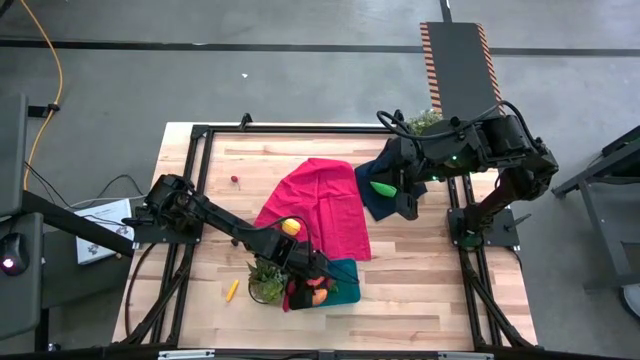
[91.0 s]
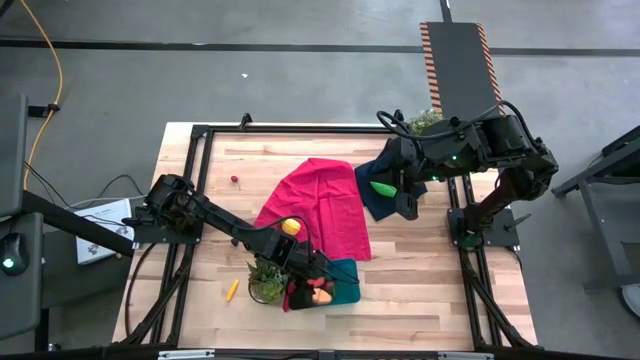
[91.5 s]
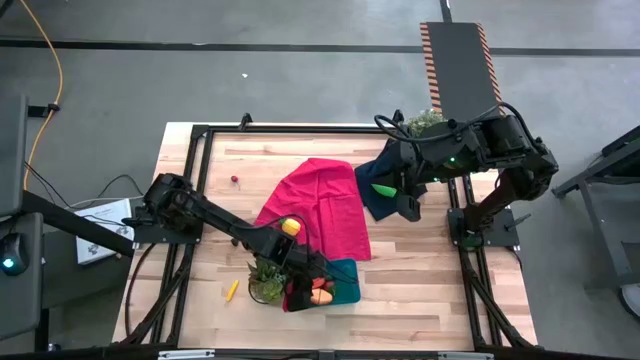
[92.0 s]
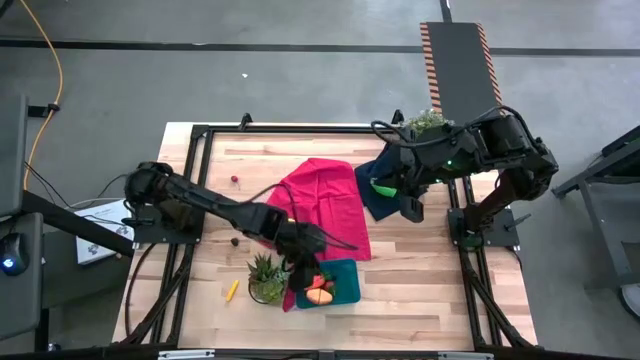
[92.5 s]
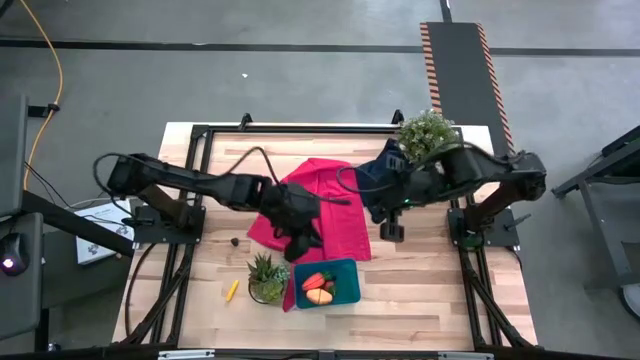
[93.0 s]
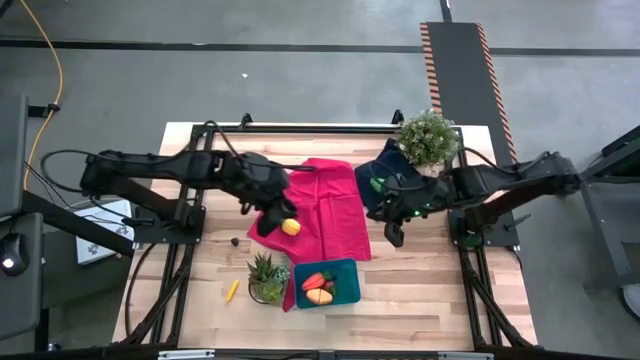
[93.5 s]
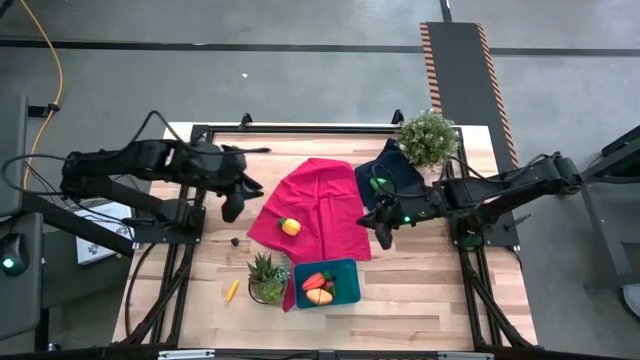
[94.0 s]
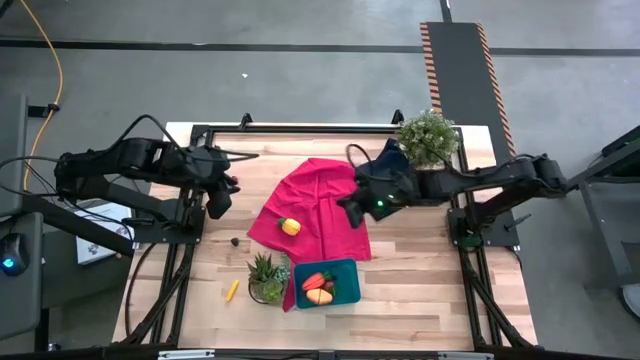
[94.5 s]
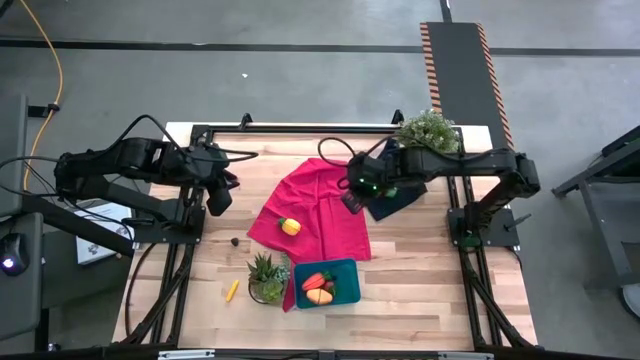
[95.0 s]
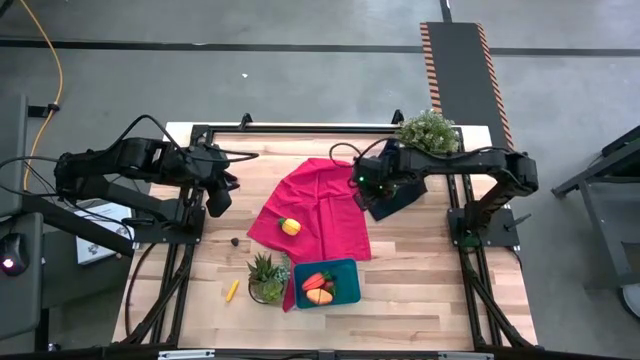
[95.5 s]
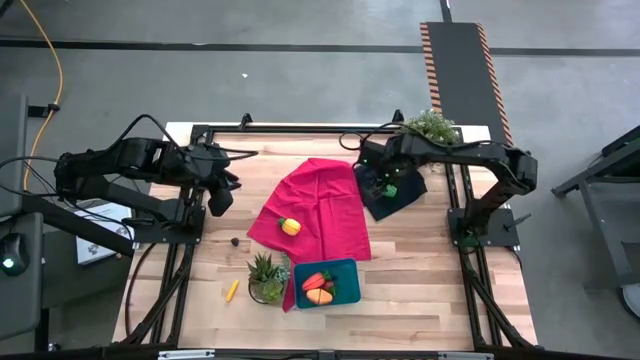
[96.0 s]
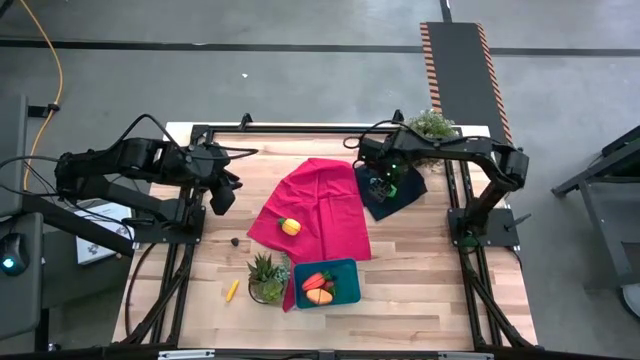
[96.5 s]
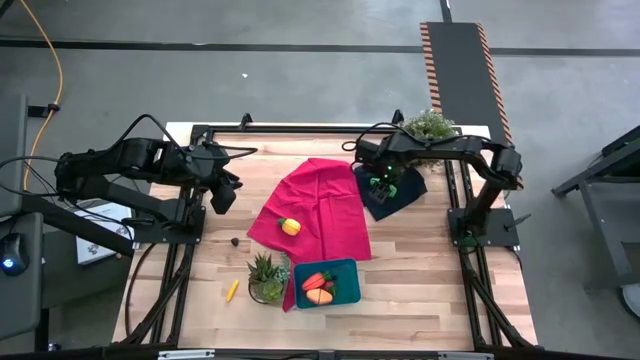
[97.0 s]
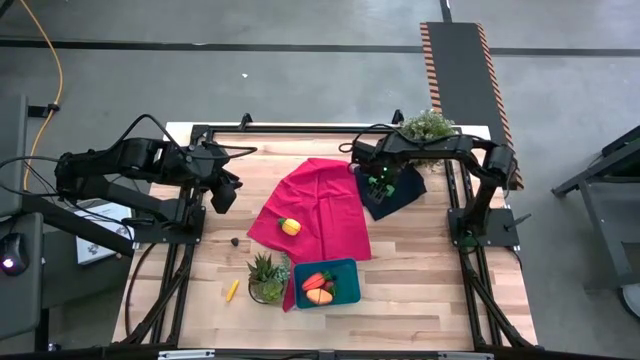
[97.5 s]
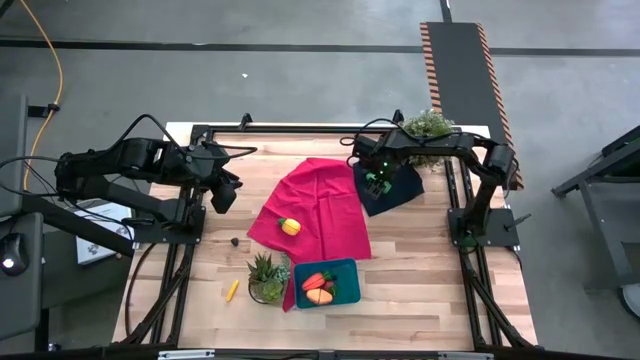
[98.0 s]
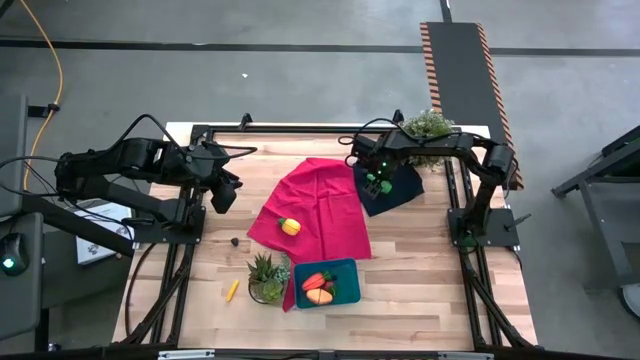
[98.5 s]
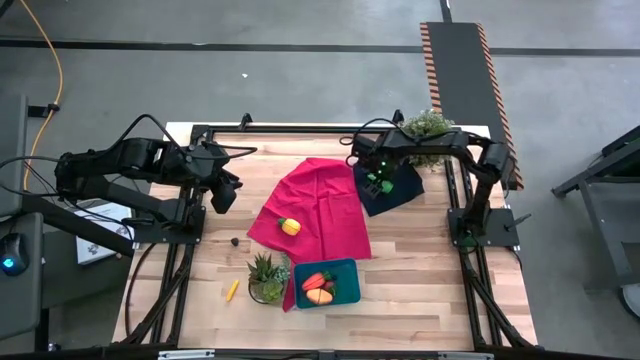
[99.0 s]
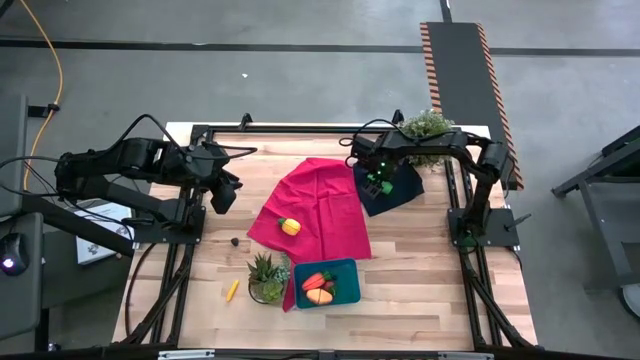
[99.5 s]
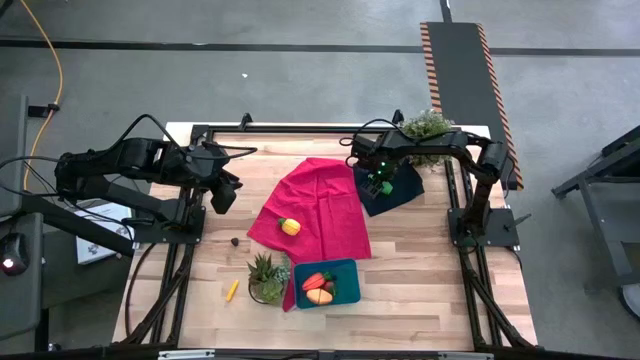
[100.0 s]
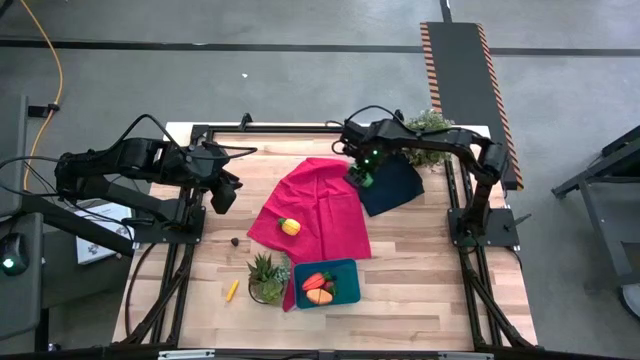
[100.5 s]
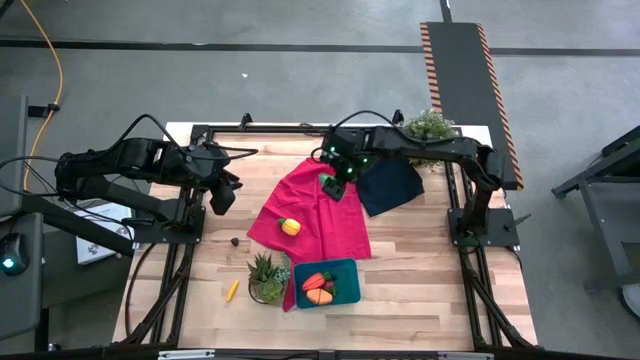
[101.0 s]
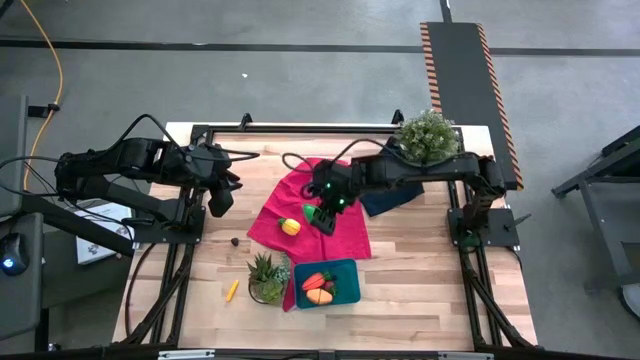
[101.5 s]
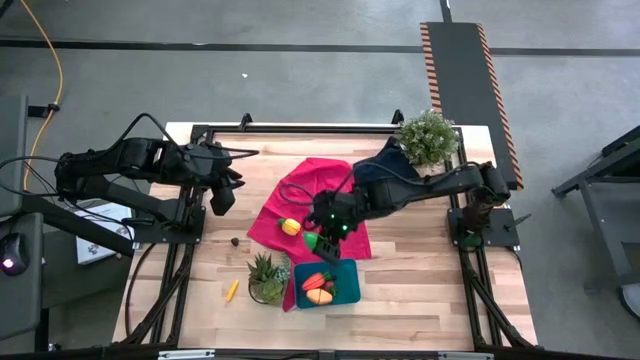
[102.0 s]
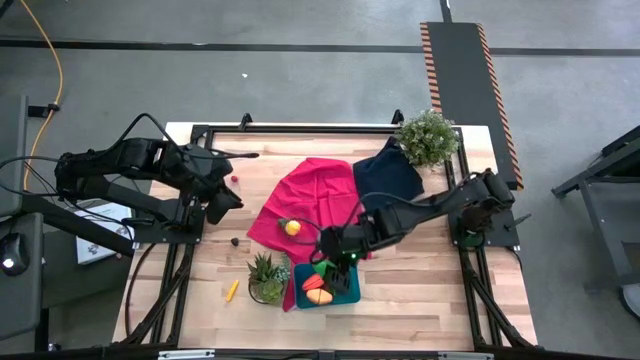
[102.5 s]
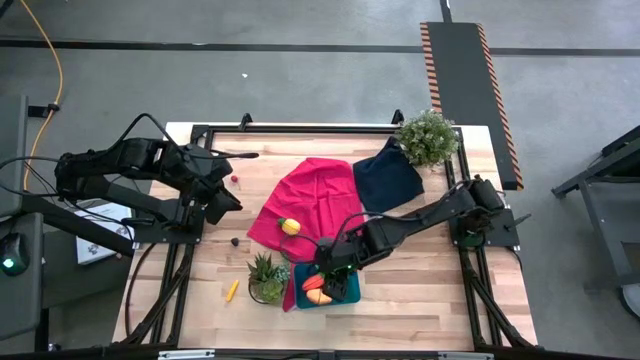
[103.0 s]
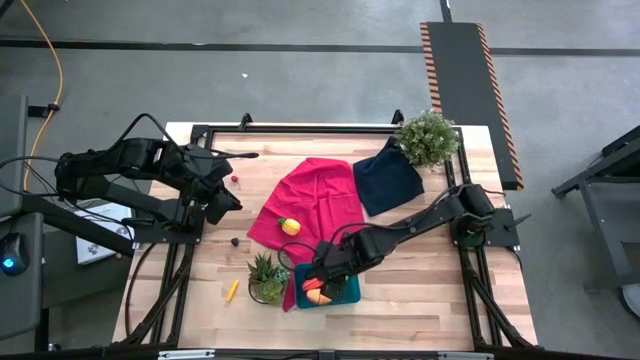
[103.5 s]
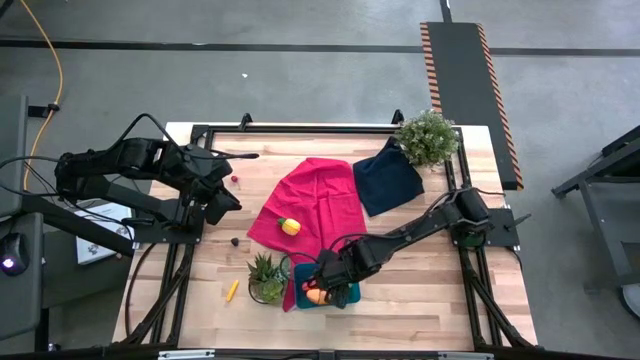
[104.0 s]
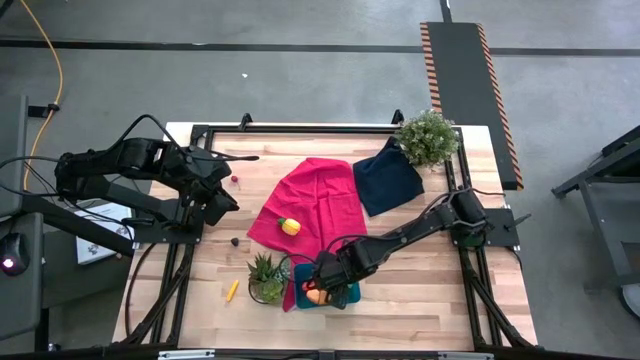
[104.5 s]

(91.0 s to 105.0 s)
Task: Pick and placing Produce into tupperware
Put the green corn into the blue bin

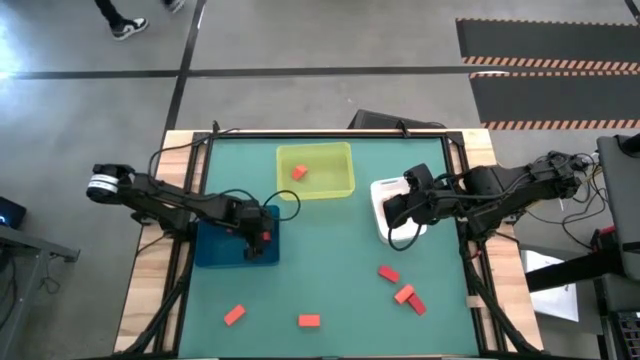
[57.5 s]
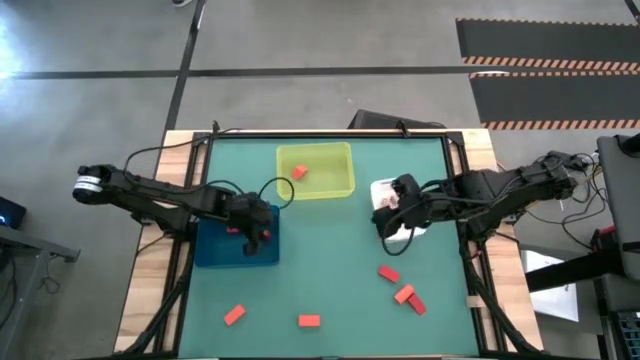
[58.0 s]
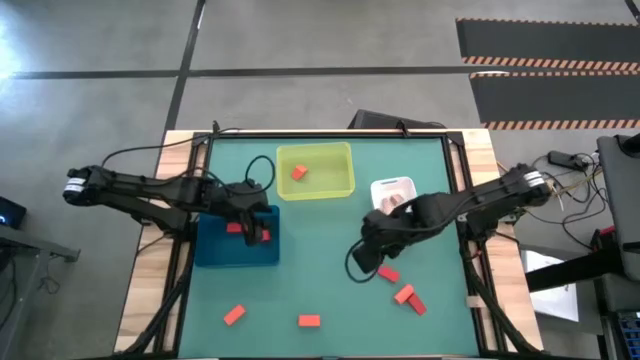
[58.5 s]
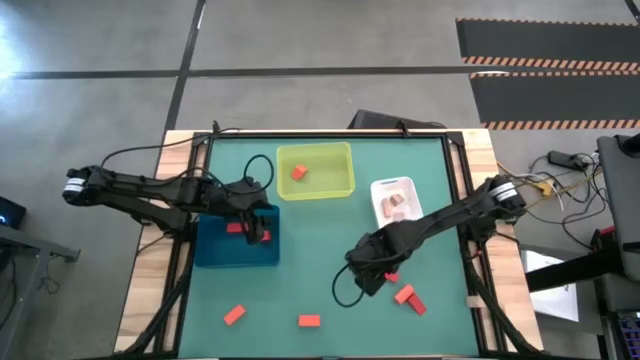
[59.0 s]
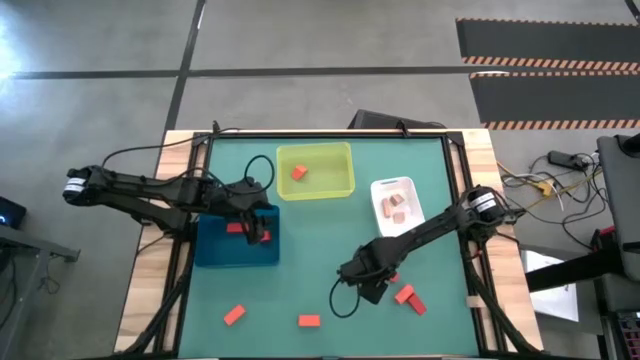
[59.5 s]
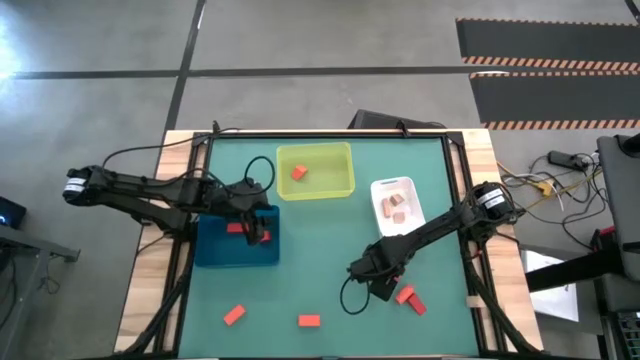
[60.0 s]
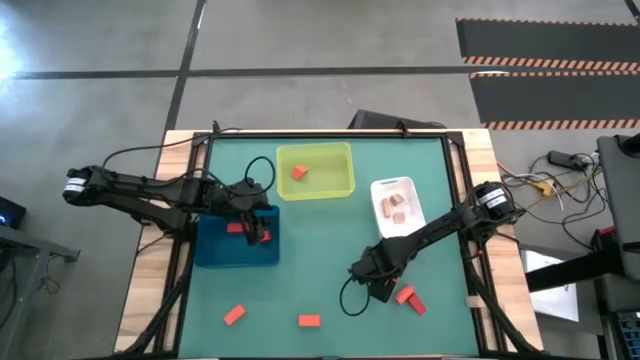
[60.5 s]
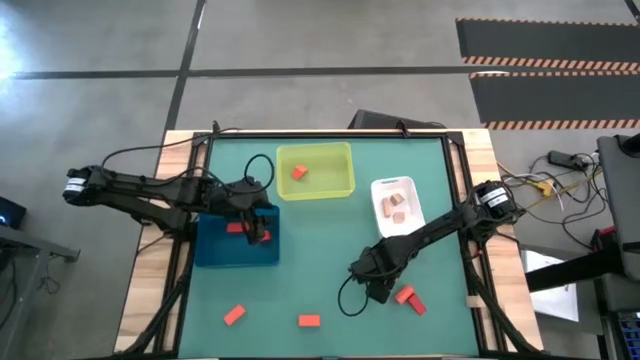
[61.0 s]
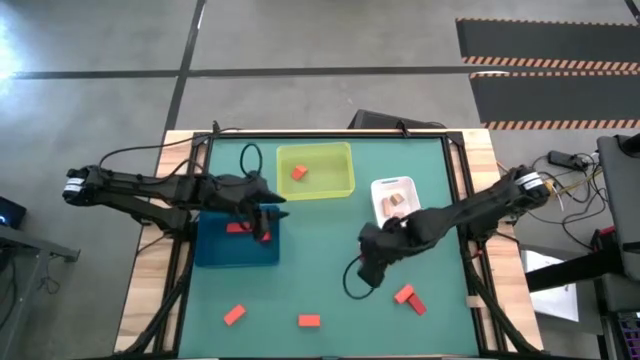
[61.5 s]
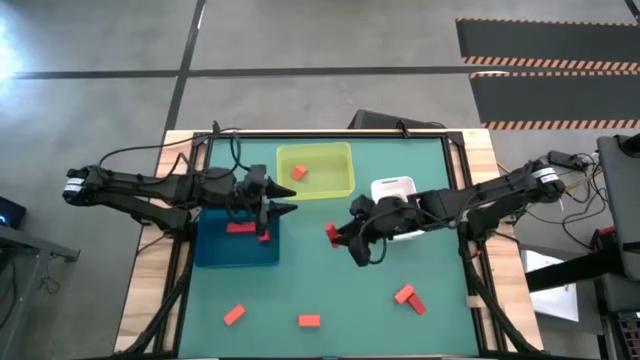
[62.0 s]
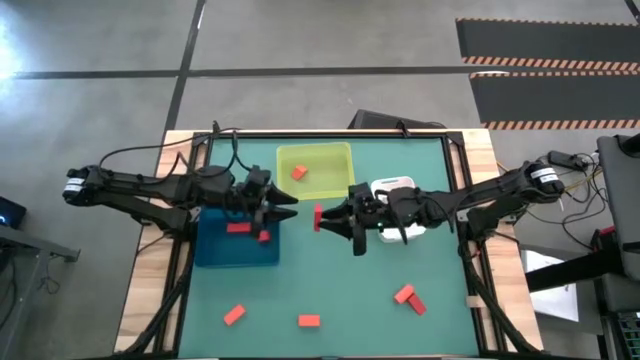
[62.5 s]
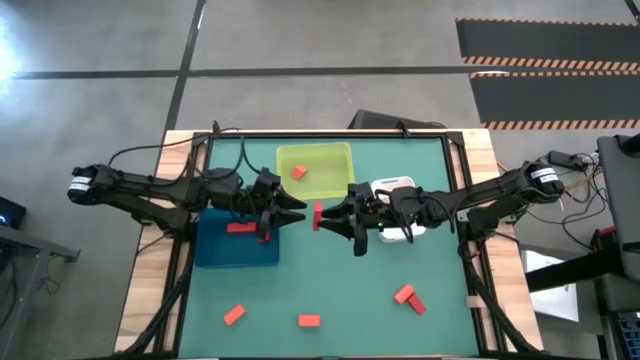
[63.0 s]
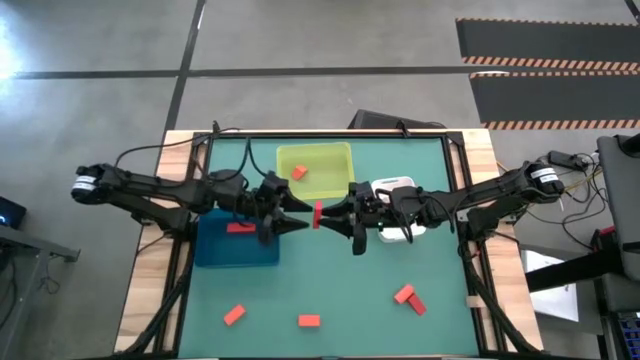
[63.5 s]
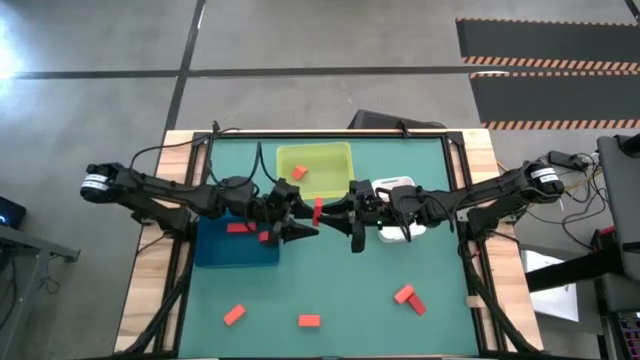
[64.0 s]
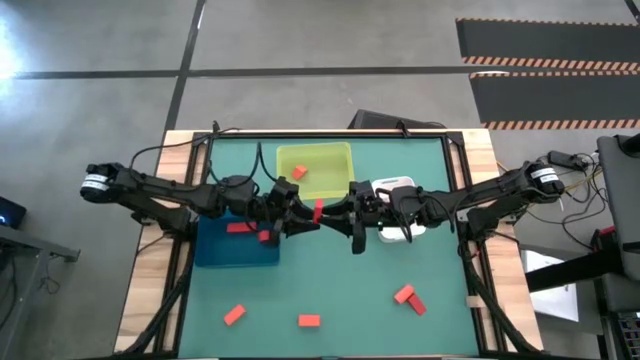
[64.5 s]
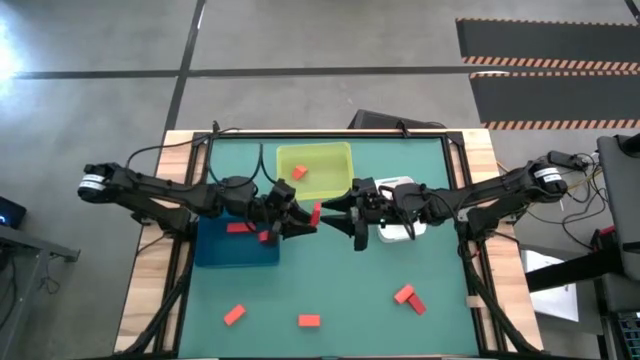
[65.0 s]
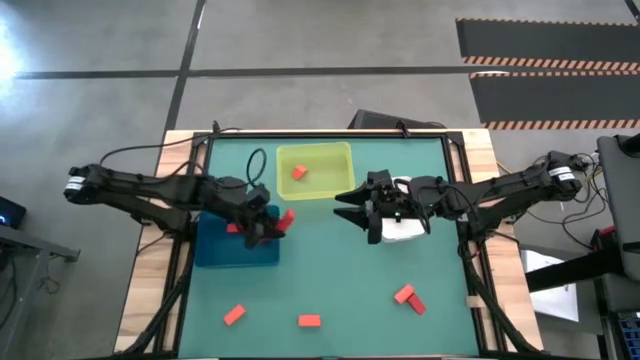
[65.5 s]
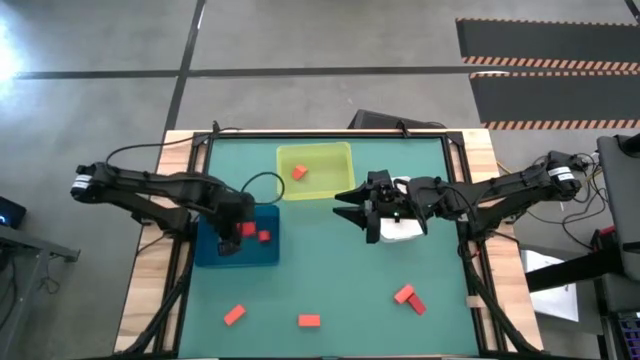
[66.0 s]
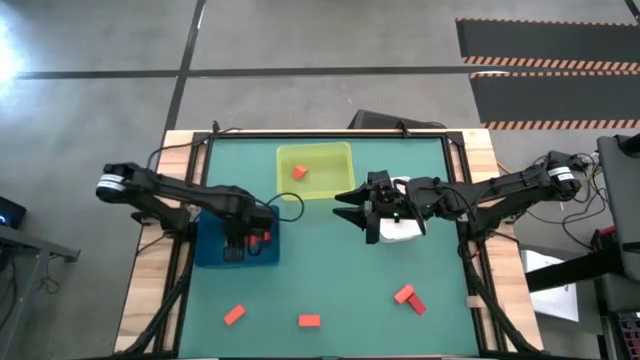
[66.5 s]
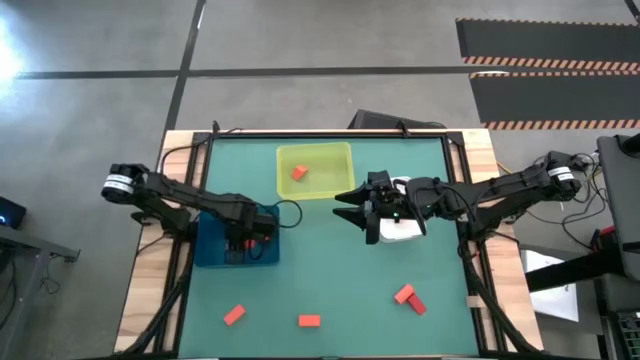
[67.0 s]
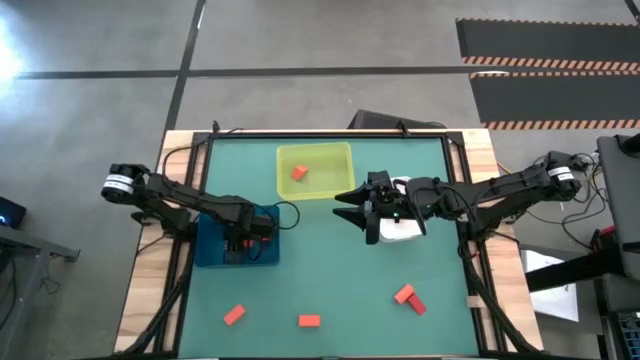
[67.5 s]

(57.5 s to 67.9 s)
Task: Sort & place blocks by color
Put the red block into the dark blue bin
